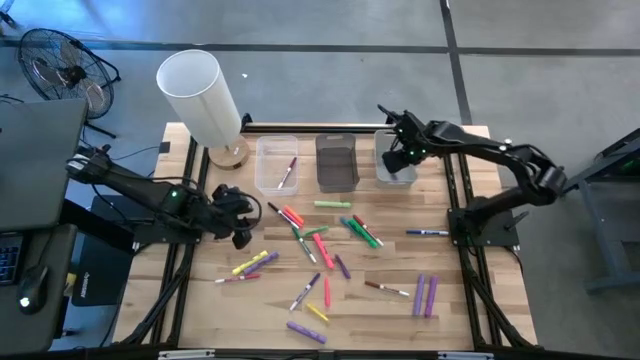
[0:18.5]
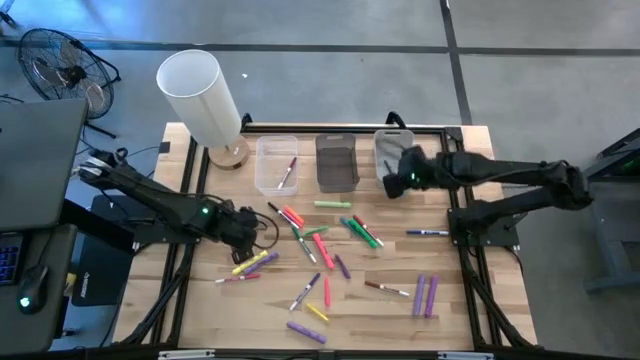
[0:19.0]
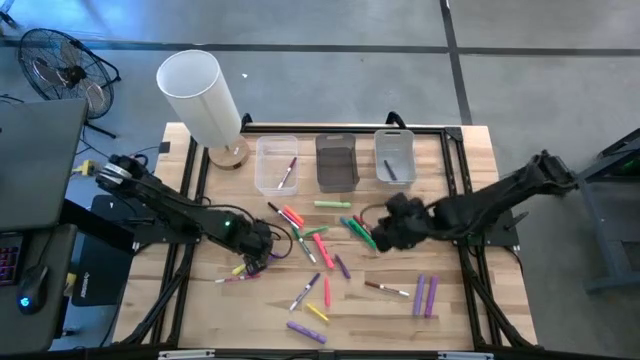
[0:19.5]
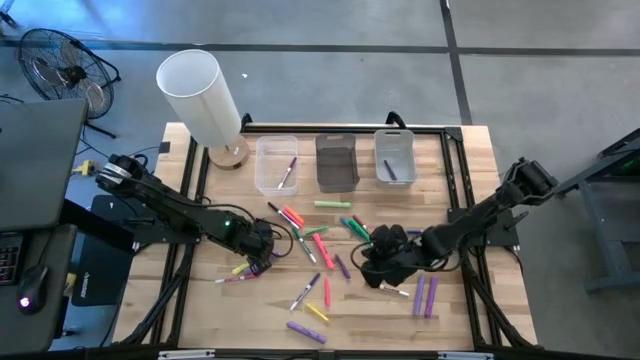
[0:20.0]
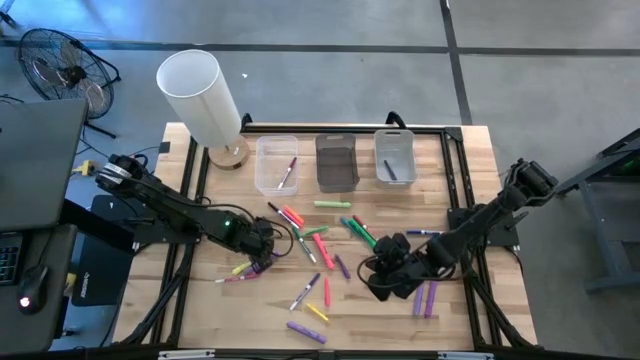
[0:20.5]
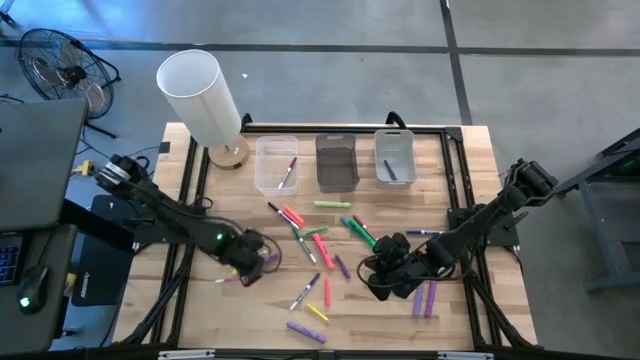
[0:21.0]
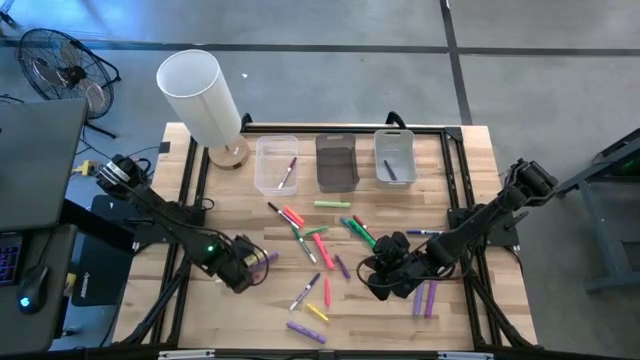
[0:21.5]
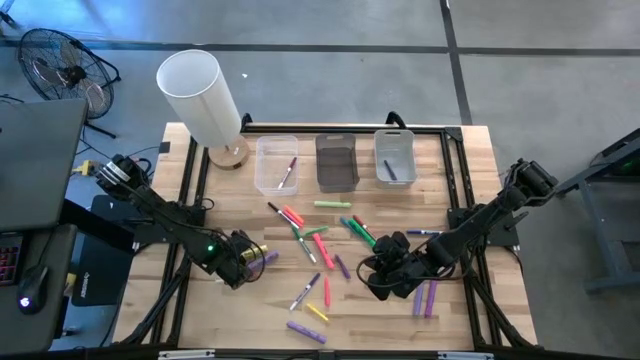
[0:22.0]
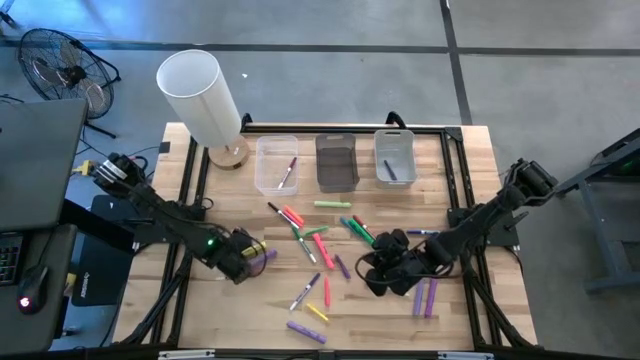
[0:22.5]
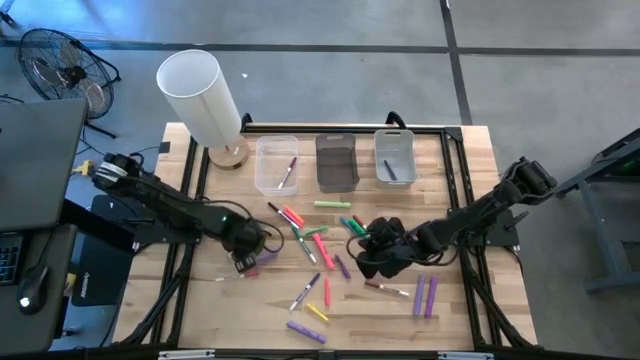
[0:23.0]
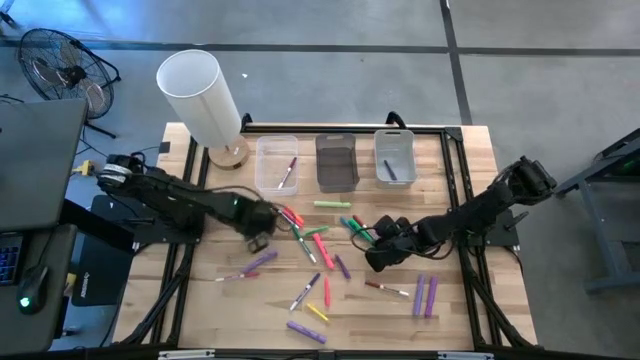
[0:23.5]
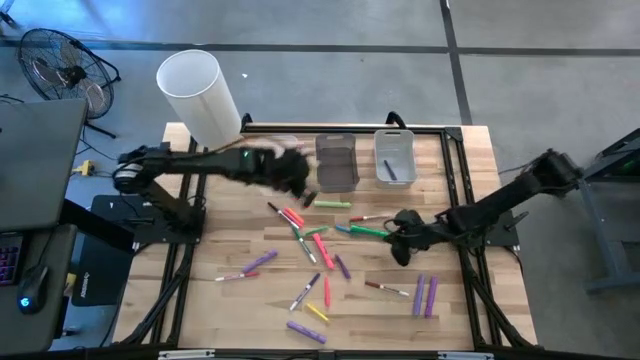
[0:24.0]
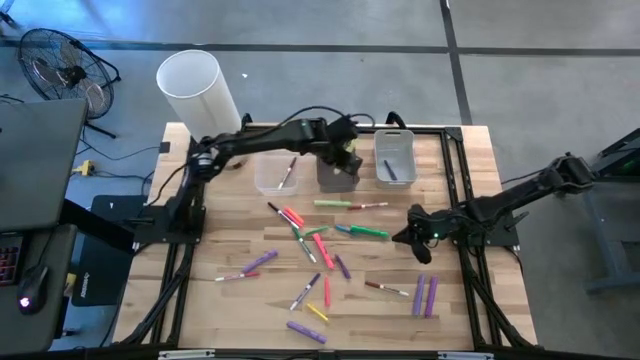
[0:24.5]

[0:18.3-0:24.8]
Task: Pick & Place Markers
Put the yellow highlighter into the black bin

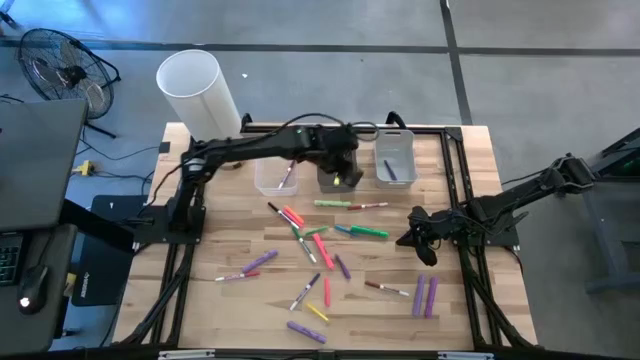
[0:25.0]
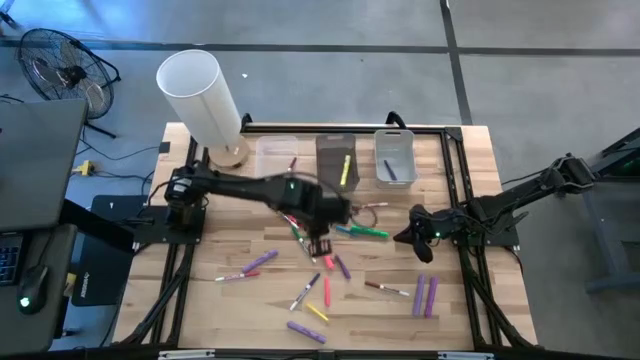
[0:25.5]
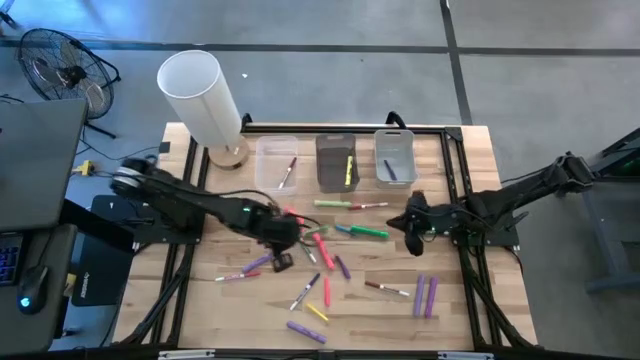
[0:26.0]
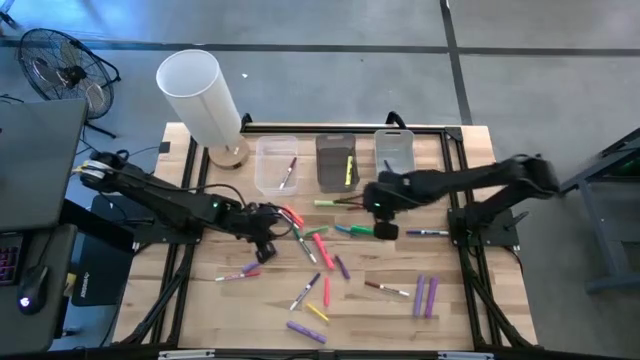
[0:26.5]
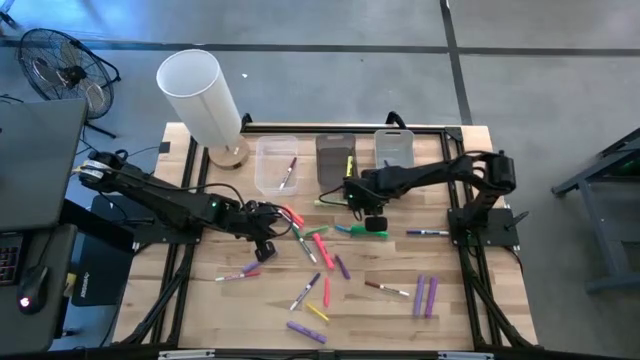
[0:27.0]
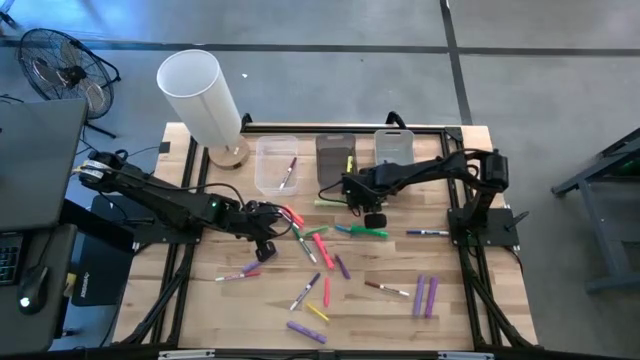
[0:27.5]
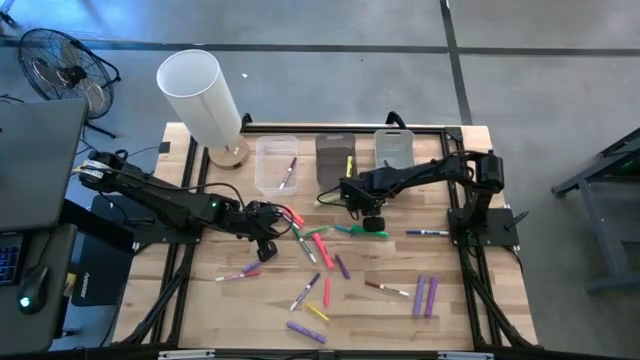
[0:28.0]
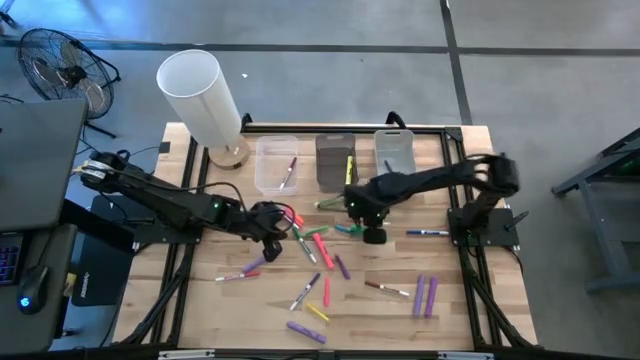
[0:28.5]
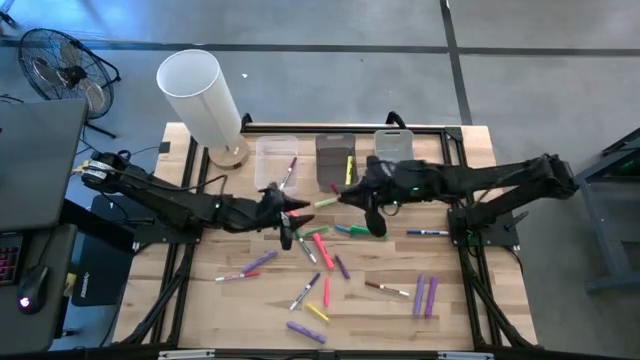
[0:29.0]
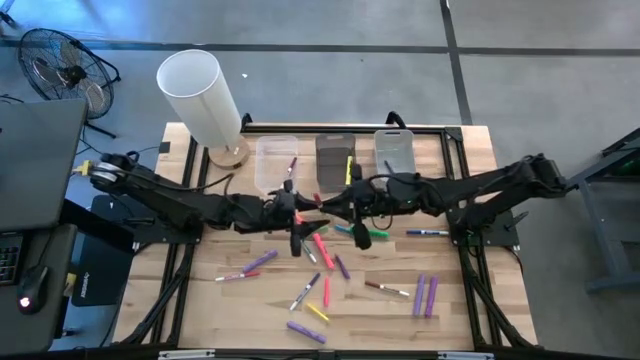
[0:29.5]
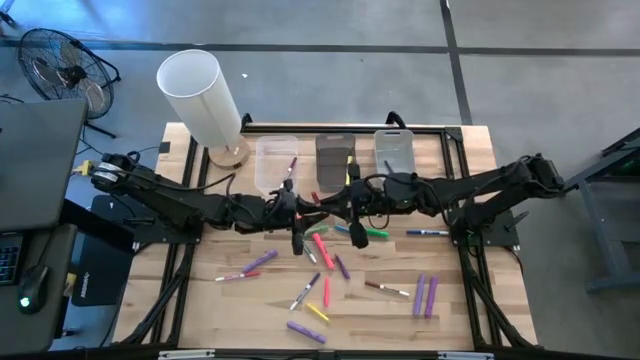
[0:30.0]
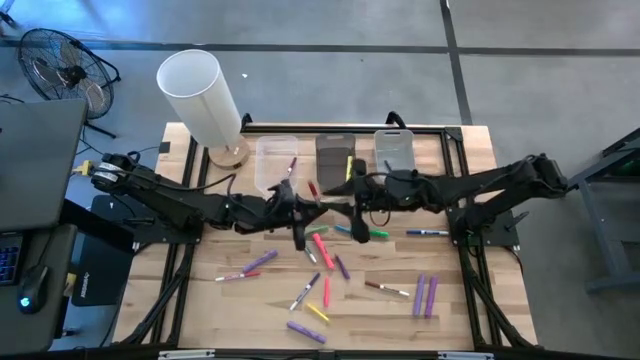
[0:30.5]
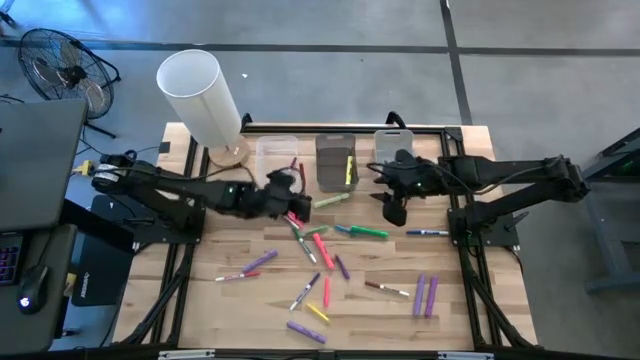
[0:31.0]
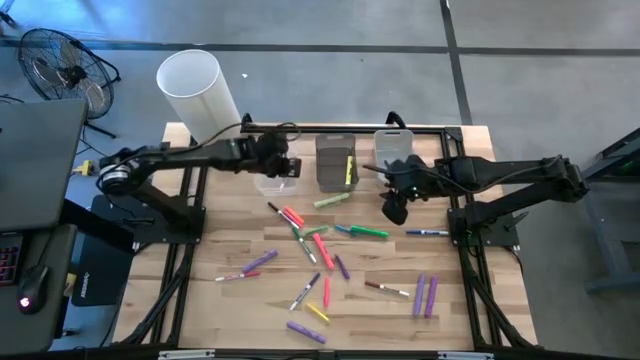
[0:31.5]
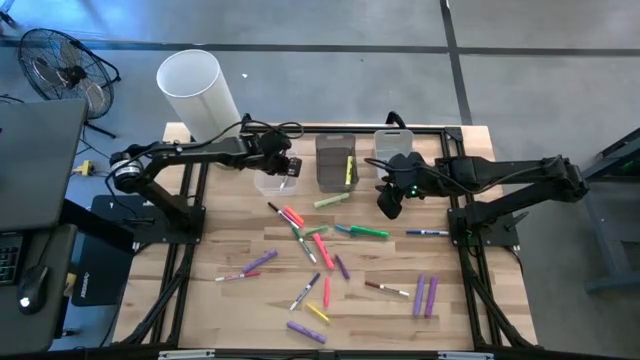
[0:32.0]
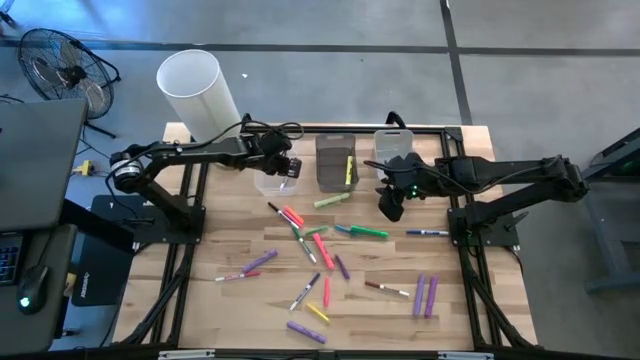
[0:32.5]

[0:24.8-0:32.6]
Put the red dry erase marker into the transparent bin

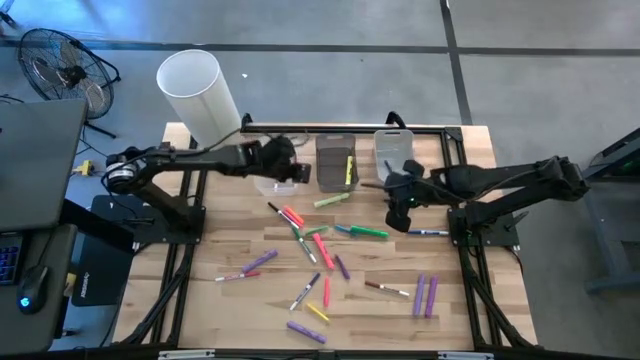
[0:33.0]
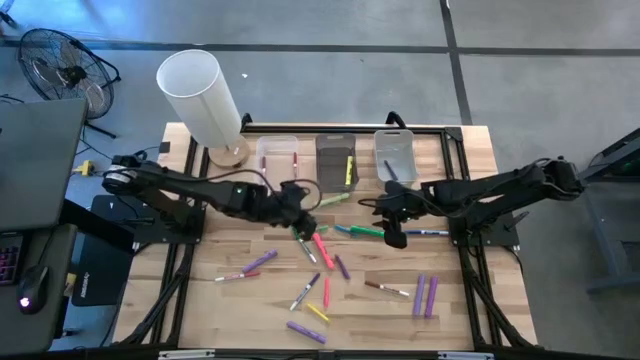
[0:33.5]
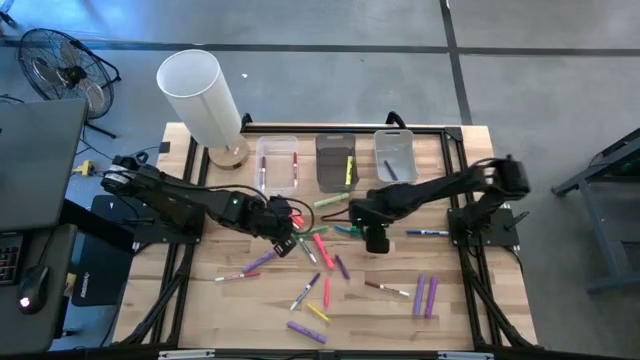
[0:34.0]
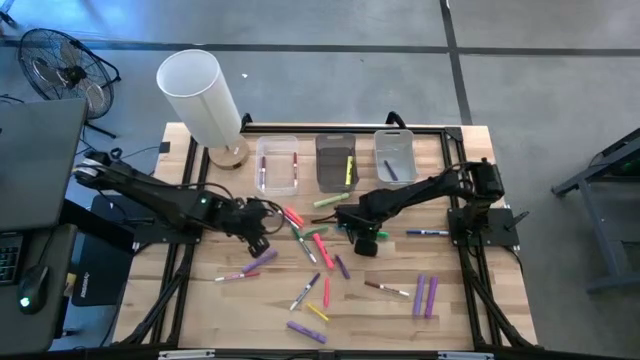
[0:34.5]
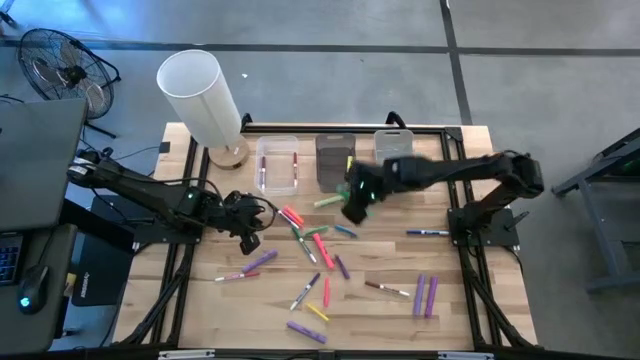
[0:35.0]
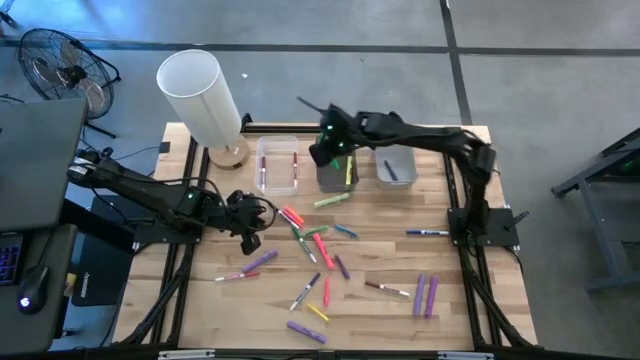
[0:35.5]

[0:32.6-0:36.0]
Put the green highlighter into the black bin

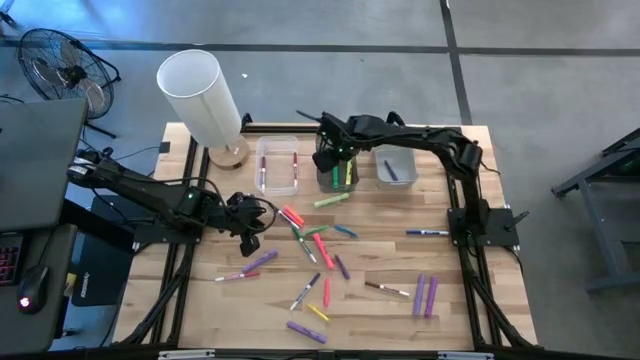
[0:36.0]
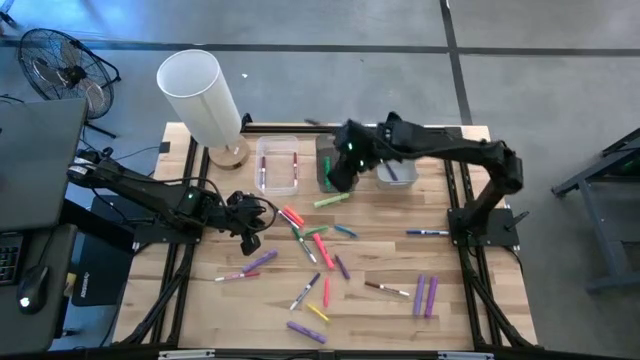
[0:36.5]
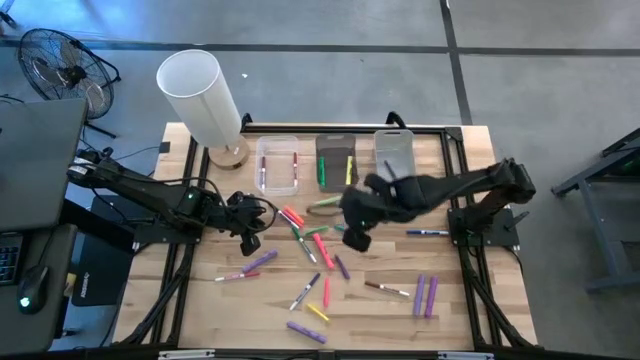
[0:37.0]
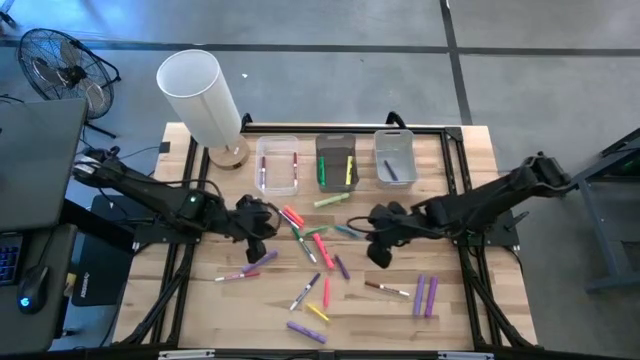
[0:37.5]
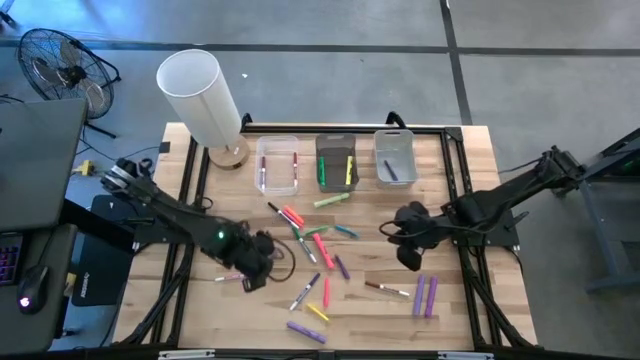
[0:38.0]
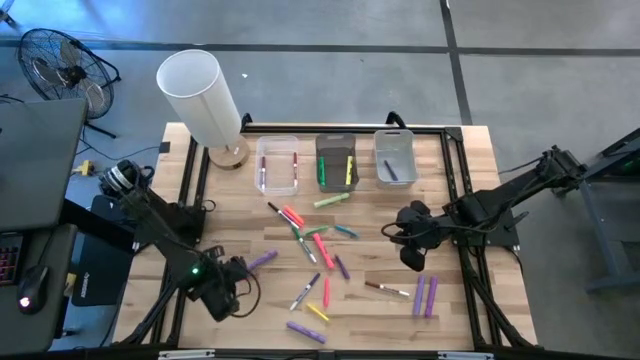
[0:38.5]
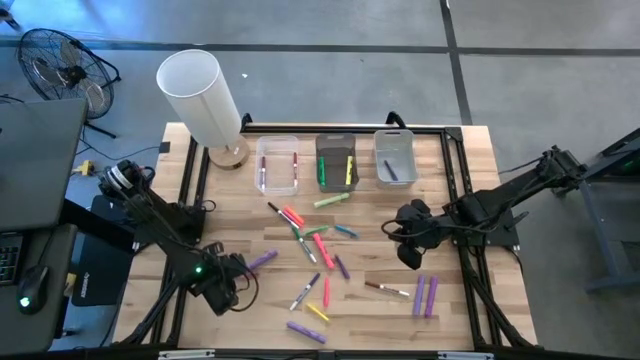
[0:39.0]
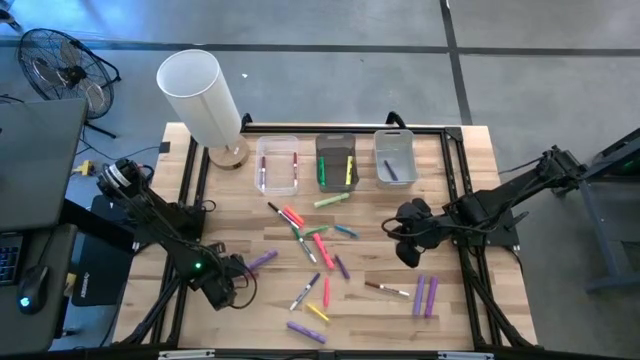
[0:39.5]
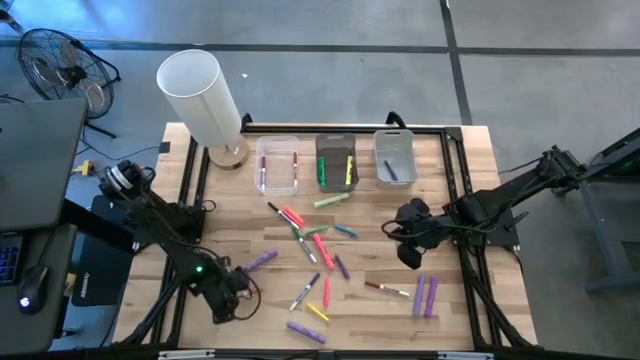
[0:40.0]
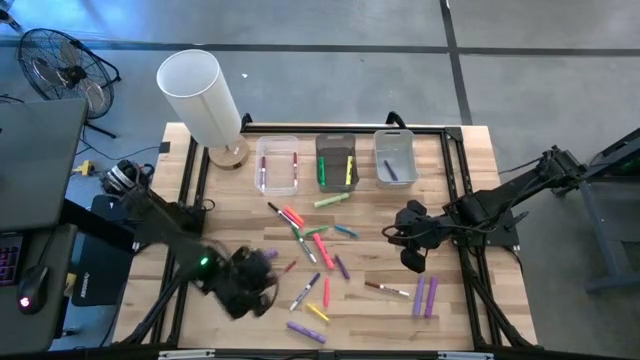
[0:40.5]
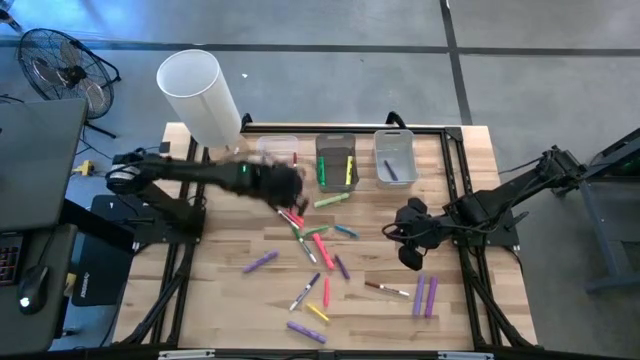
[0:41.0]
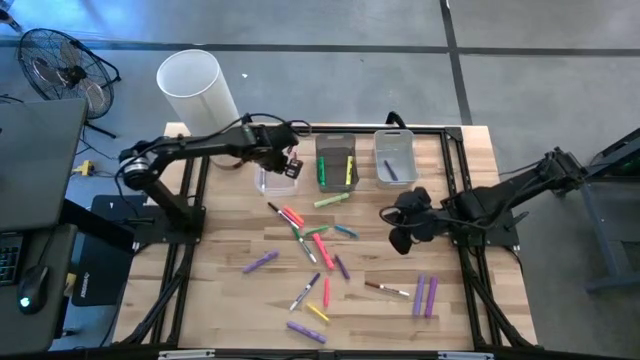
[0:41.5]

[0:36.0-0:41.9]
Put the pink dry erase marker into the transparent bin
